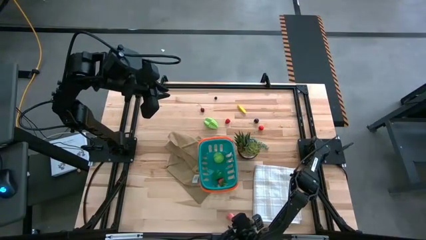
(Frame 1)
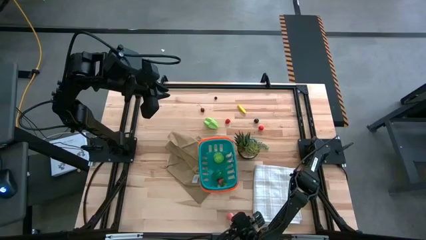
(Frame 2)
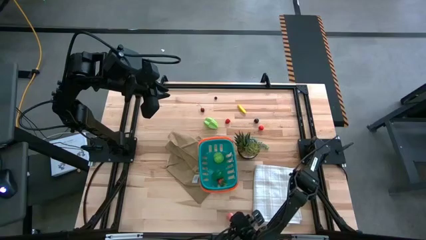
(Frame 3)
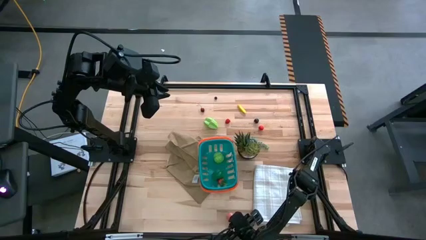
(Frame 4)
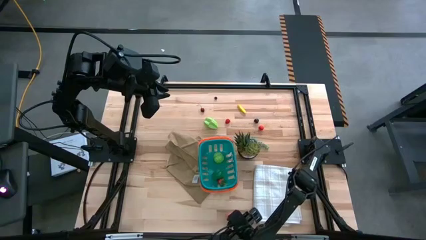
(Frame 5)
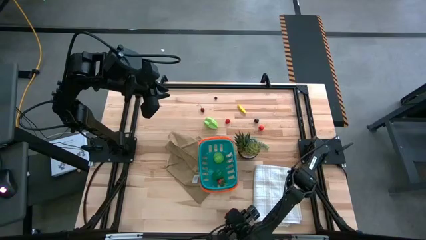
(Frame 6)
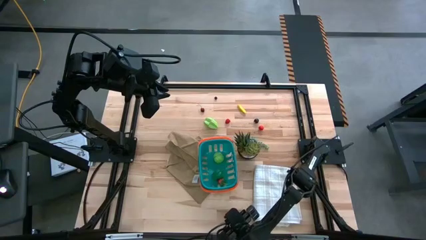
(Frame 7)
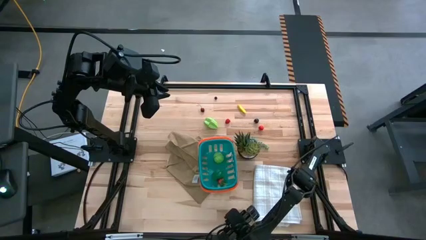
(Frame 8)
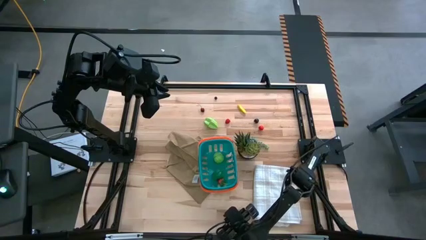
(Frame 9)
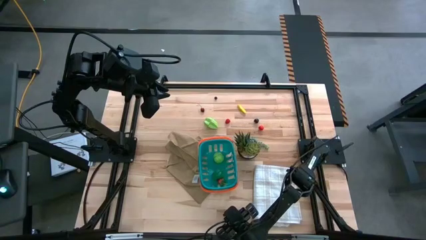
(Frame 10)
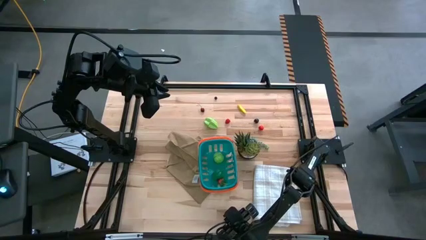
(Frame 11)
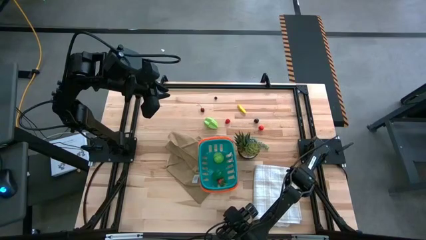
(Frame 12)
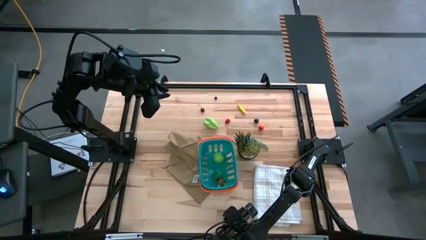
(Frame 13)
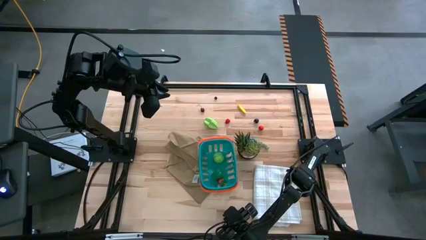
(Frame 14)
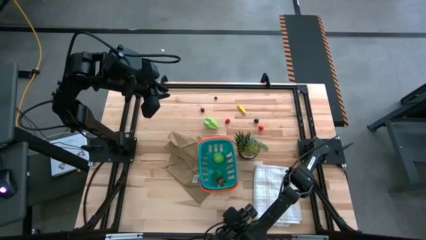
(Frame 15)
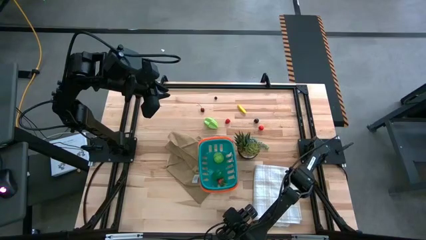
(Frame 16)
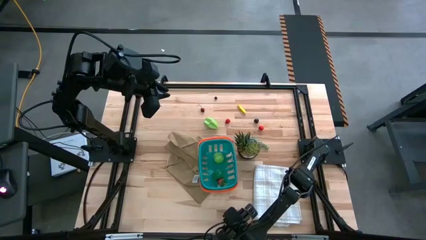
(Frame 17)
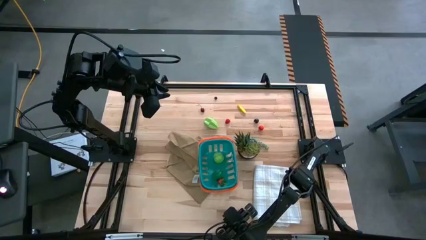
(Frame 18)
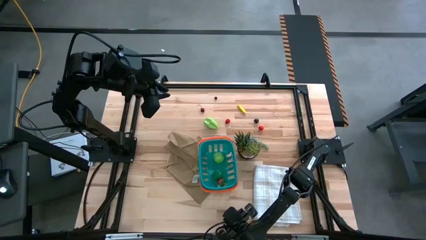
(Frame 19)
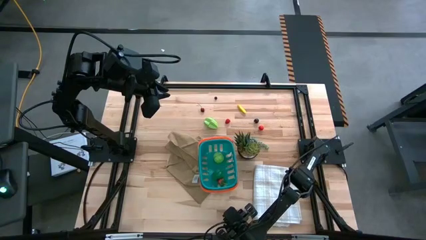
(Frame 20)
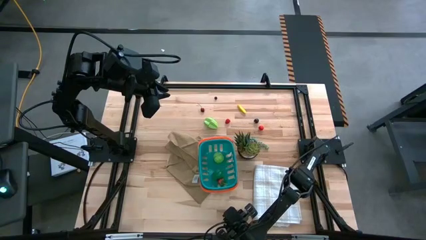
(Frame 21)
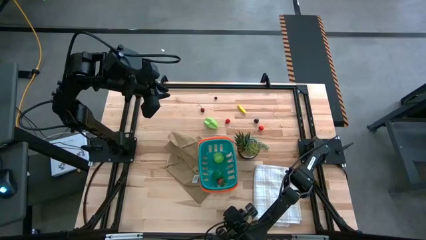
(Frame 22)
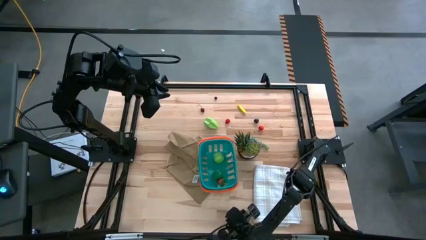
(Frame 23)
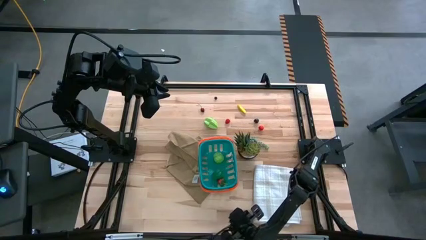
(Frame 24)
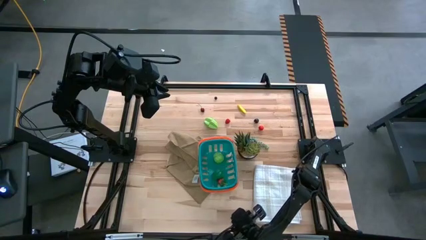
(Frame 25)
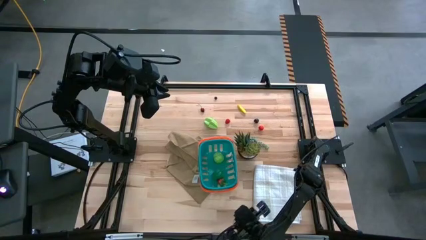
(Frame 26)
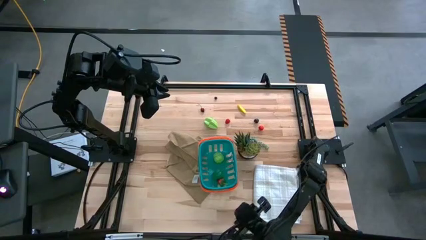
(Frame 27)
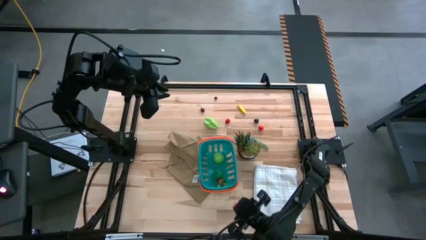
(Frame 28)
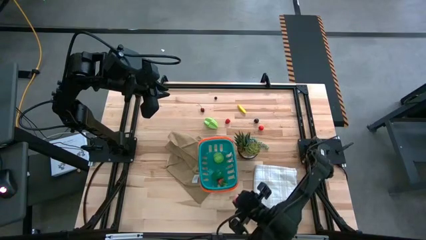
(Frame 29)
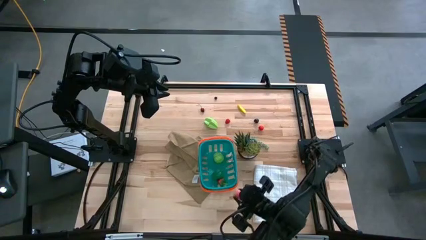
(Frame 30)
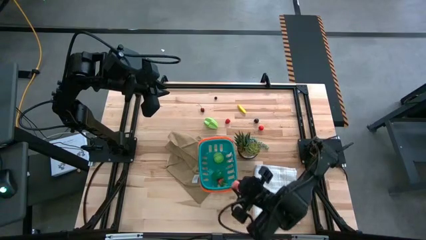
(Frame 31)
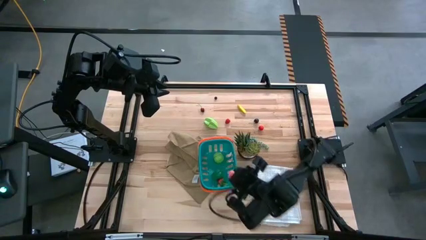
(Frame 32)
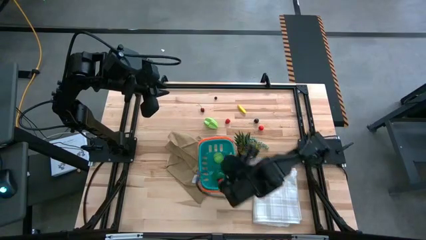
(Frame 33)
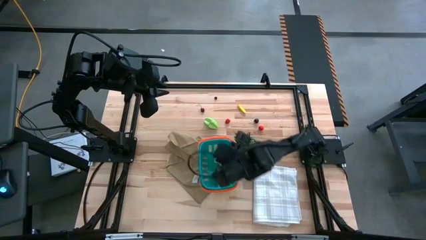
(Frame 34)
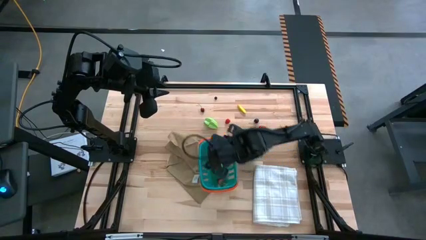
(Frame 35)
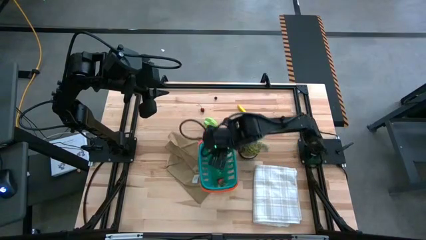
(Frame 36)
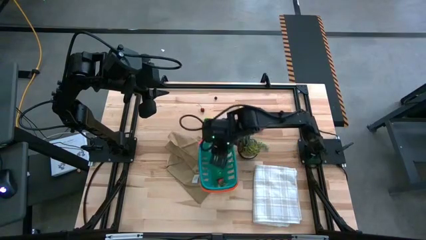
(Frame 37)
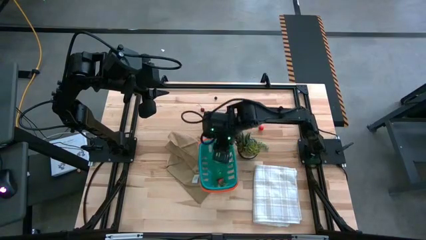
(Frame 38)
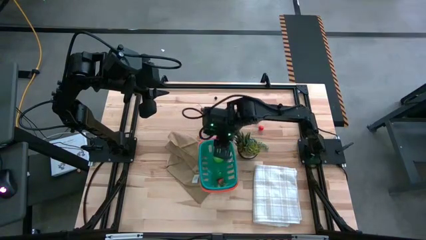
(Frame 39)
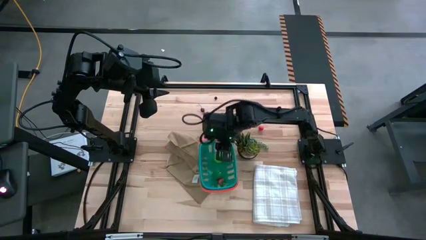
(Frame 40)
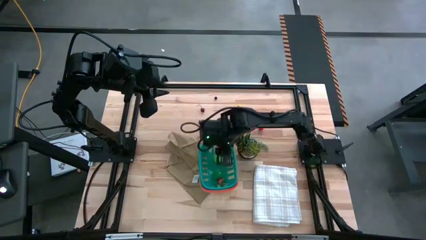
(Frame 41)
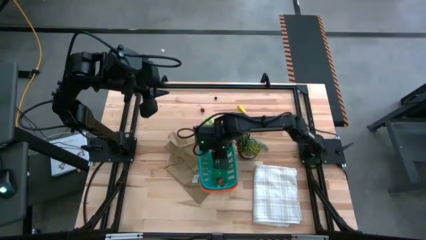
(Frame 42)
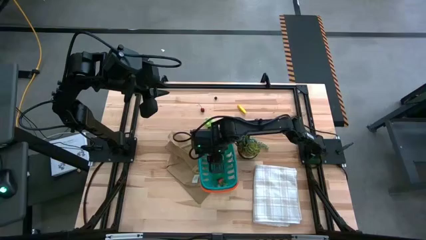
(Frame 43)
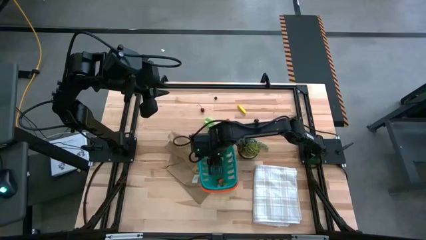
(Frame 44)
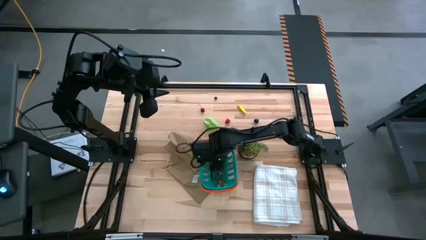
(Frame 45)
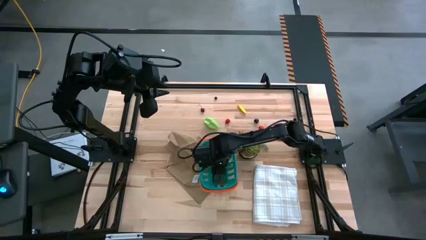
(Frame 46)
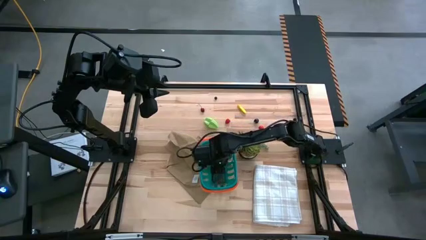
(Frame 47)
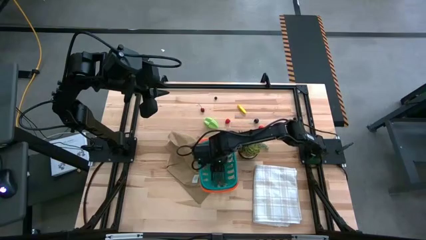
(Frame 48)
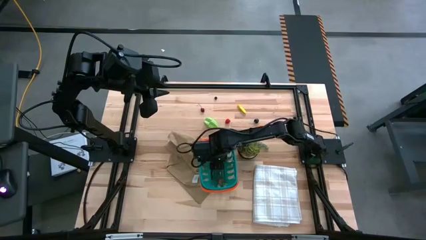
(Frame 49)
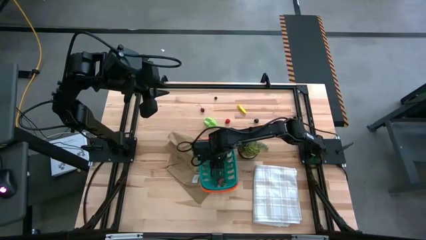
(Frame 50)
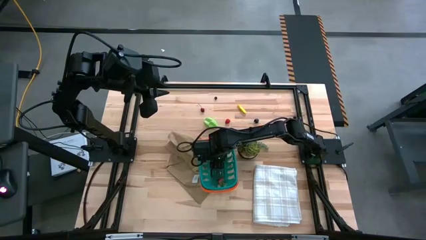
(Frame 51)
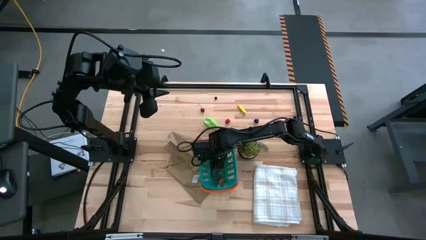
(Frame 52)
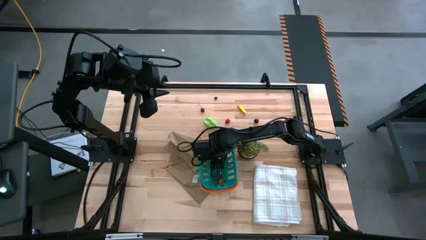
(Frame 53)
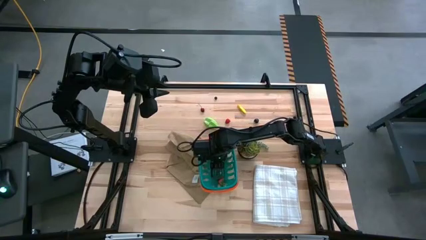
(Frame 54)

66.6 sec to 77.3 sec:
Task: Pick and placing Produce into tupperware
Put the pink peach into the green basket
